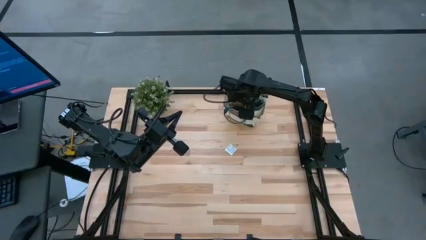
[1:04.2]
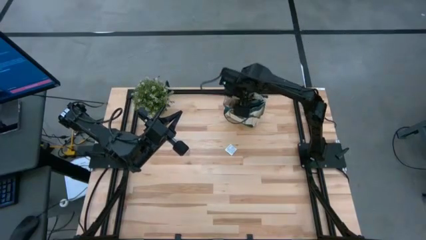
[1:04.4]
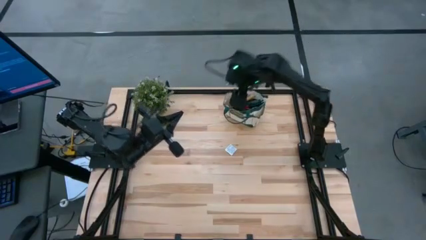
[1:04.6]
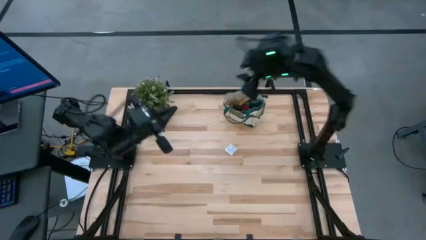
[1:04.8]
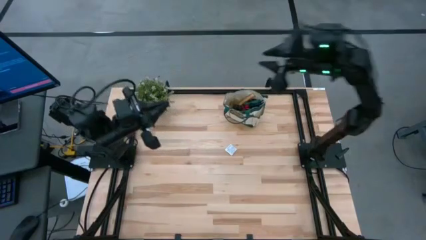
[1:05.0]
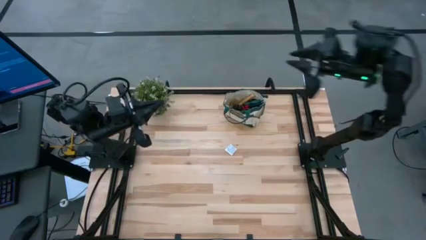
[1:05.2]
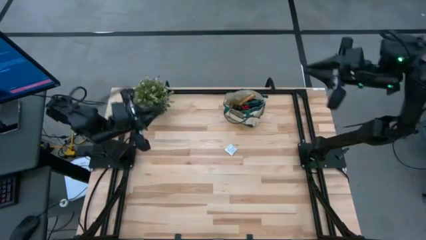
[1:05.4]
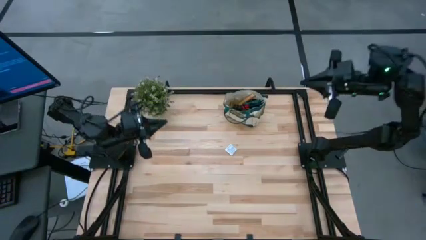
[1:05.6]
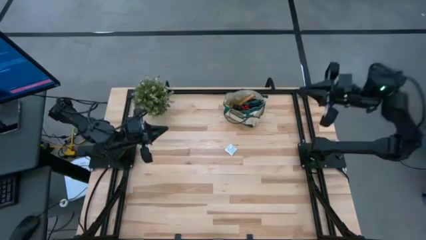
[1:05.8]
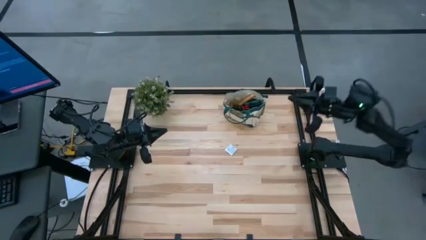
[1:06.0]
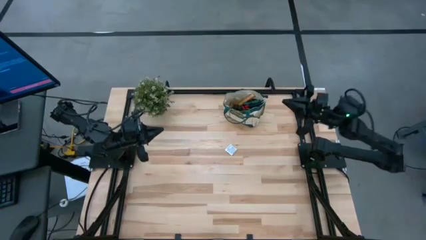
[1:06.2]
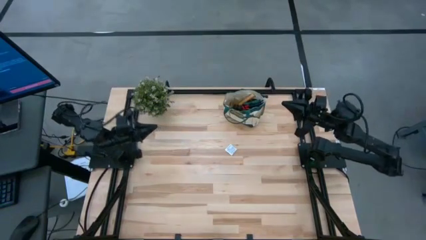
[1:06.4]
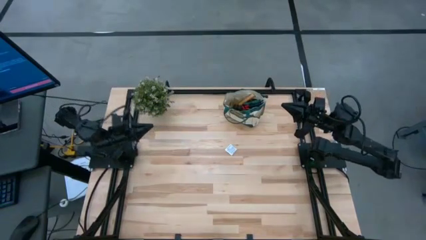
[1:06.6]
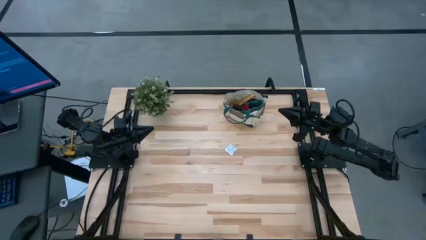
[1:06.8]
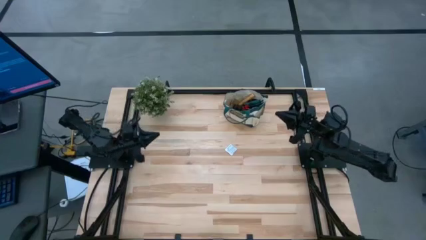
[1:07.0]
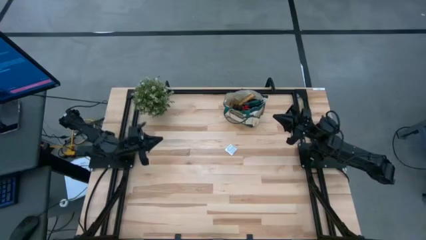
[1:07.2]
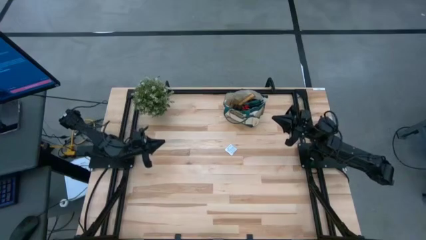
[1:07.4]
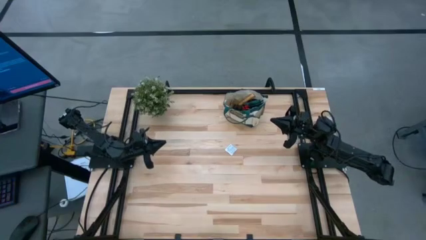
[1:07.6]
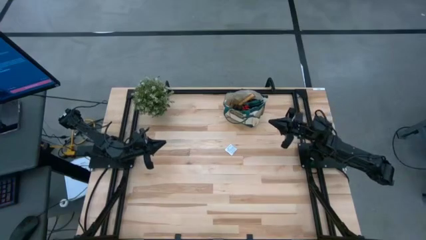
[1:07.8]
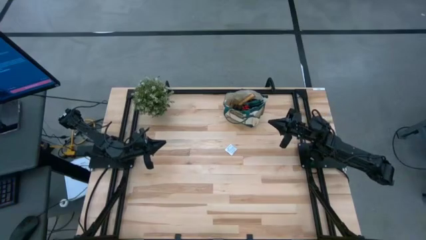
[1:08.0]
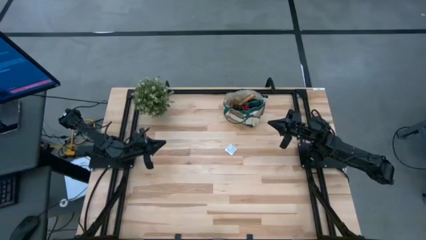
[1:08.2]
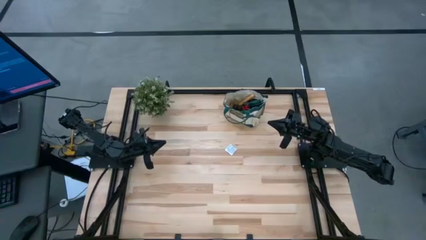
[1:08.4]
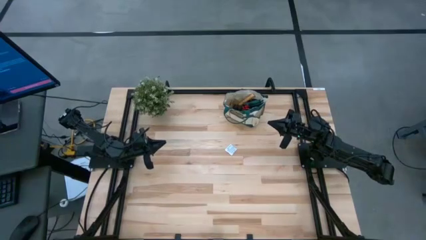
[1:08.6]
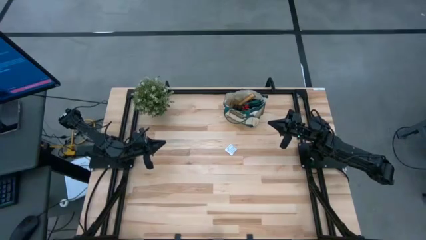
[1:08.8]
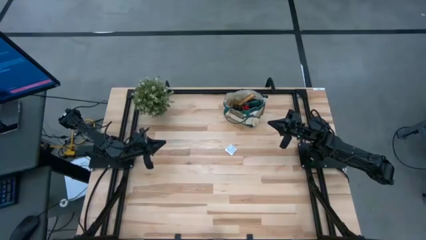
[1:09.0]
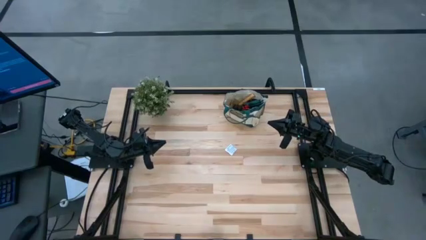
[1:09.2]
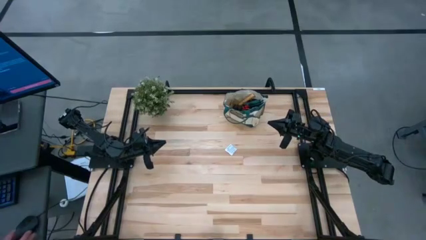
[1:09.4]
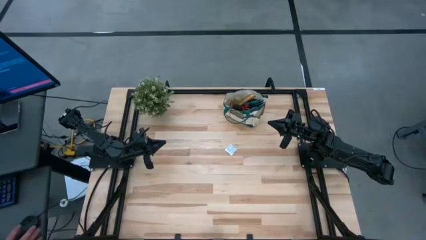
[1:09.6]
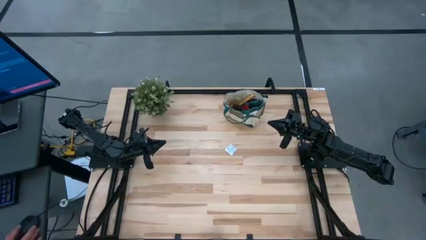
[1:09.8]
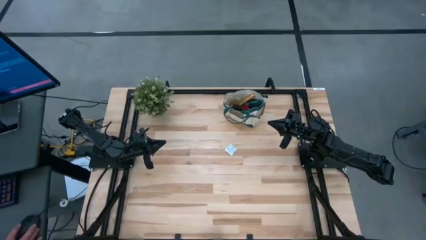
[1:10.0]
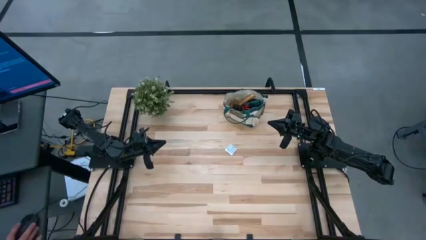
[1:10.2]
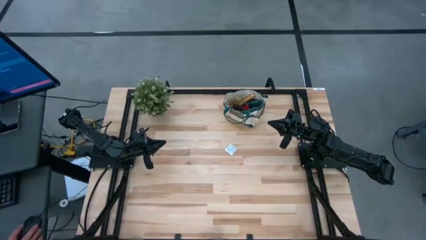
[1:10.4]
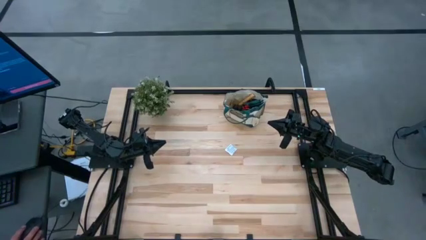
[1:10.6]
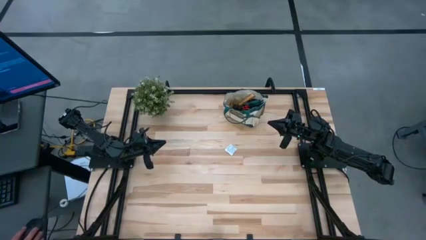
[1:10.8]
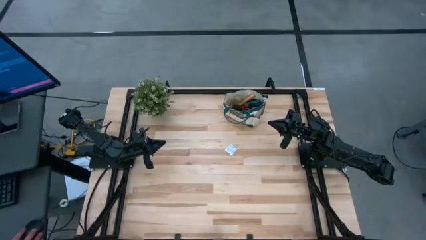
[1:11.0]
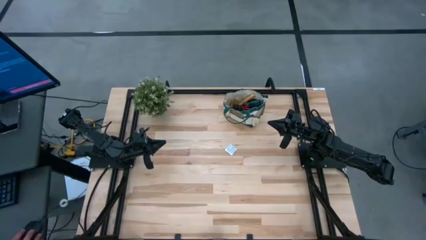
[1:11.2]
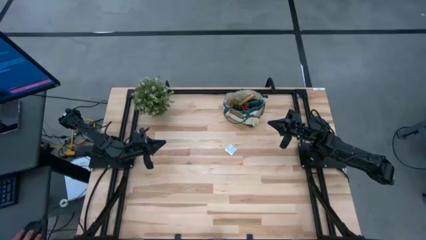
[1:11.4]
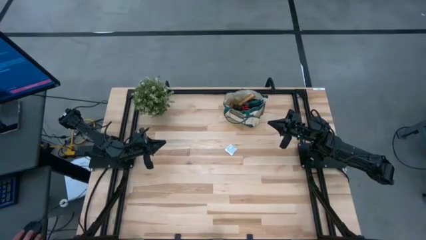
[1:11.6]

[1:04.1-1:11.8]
Task: Pick & Place Garden tools in Gardening bag
Return to Home Position

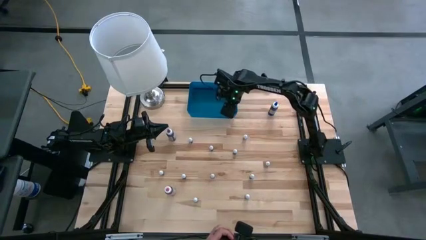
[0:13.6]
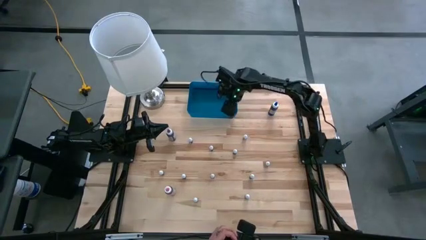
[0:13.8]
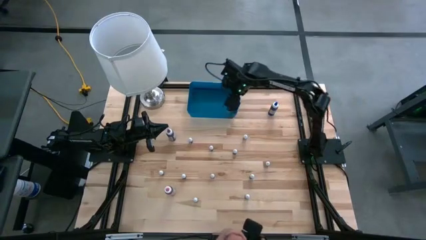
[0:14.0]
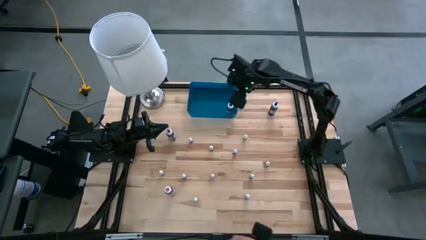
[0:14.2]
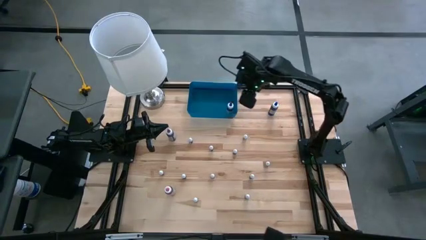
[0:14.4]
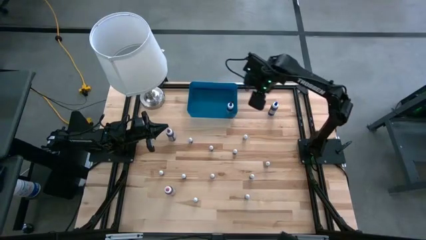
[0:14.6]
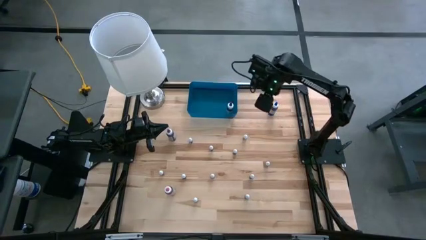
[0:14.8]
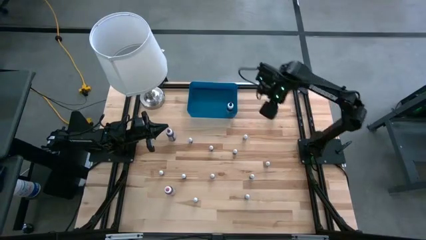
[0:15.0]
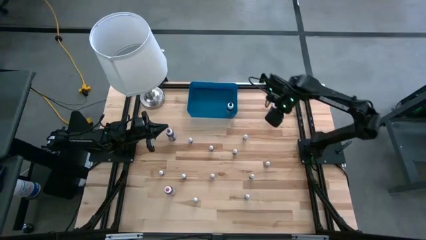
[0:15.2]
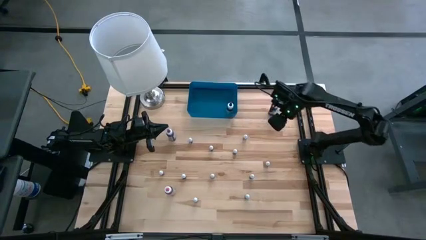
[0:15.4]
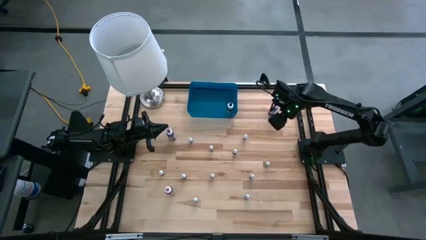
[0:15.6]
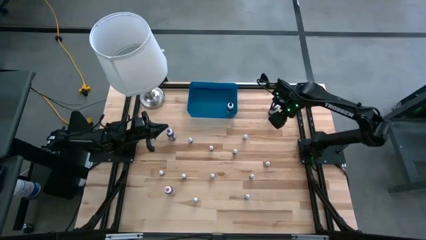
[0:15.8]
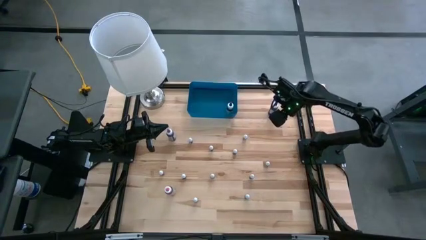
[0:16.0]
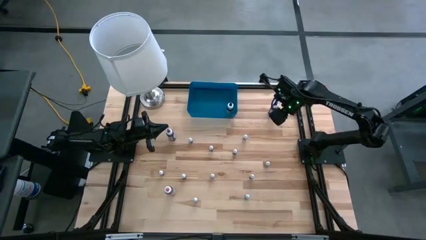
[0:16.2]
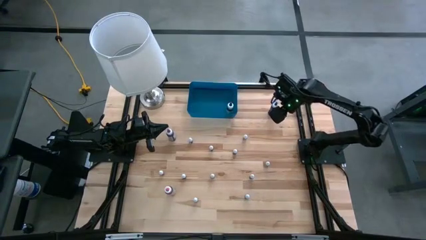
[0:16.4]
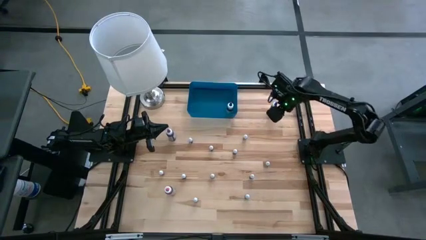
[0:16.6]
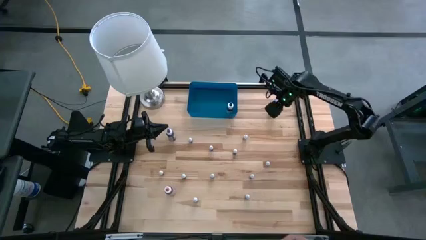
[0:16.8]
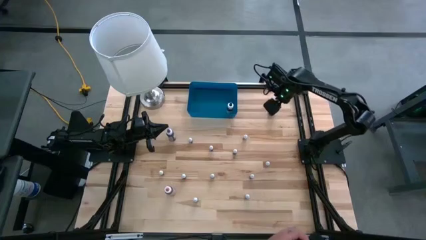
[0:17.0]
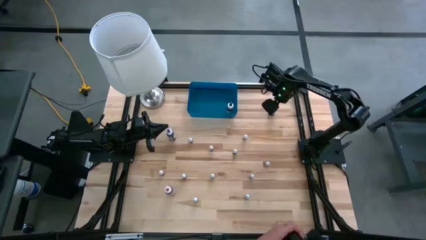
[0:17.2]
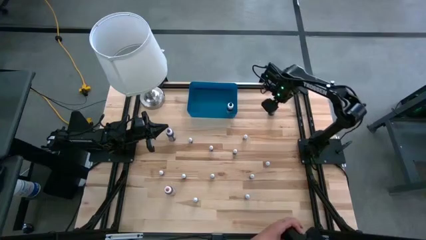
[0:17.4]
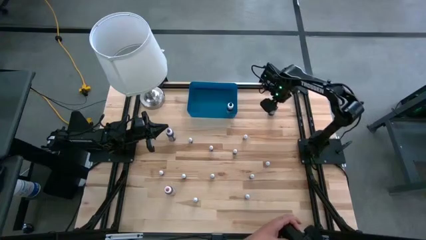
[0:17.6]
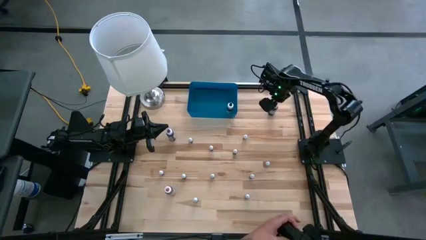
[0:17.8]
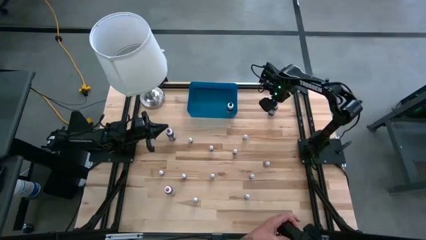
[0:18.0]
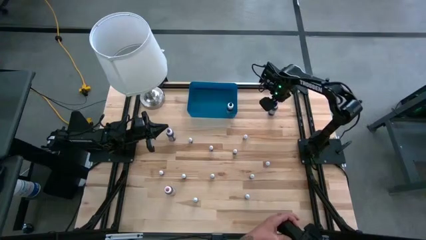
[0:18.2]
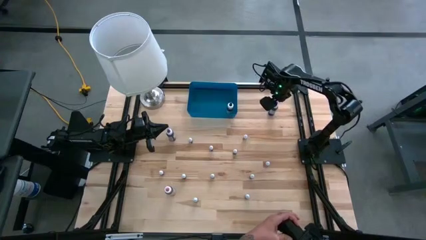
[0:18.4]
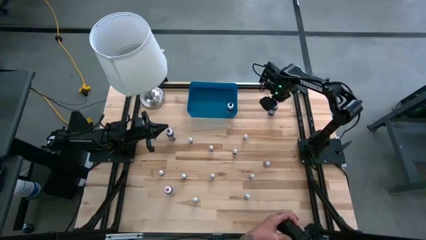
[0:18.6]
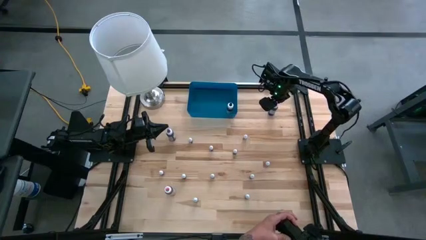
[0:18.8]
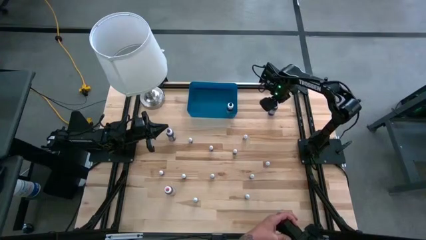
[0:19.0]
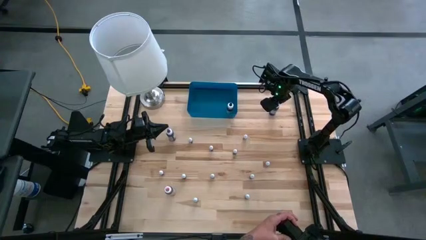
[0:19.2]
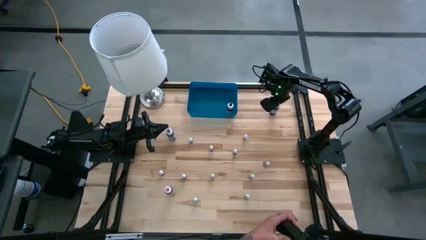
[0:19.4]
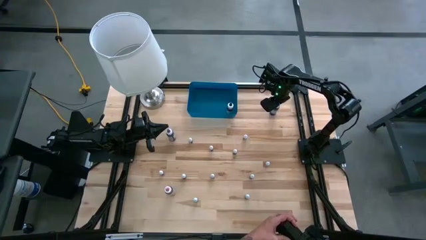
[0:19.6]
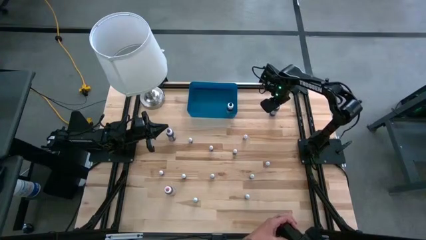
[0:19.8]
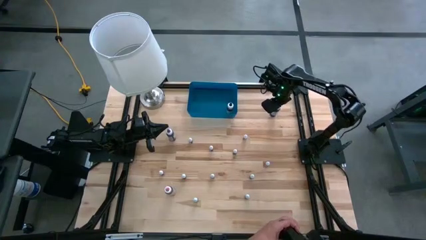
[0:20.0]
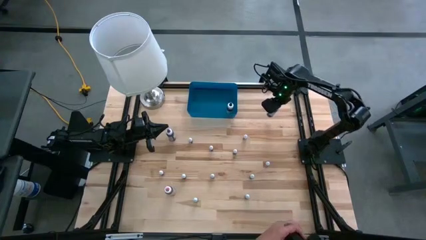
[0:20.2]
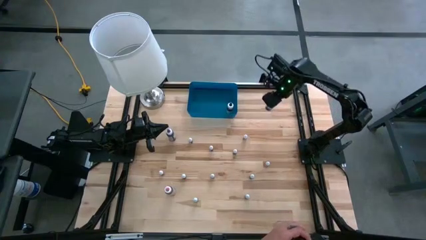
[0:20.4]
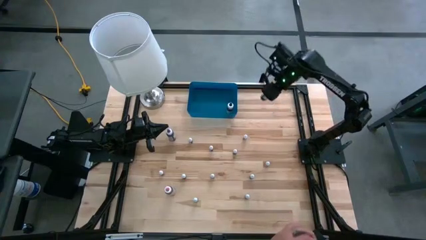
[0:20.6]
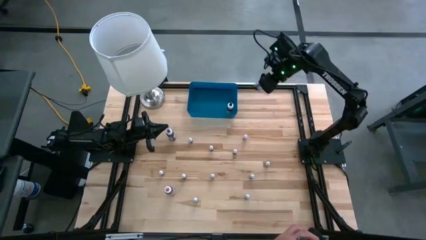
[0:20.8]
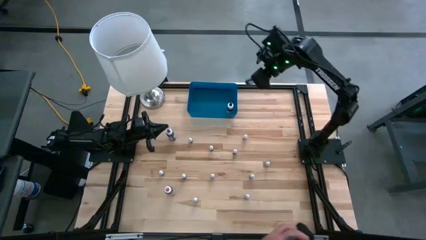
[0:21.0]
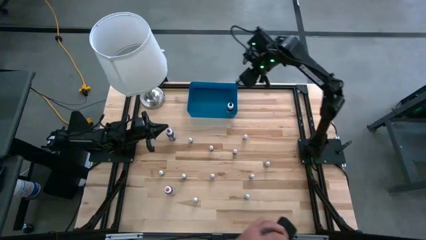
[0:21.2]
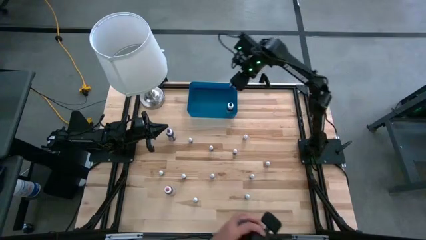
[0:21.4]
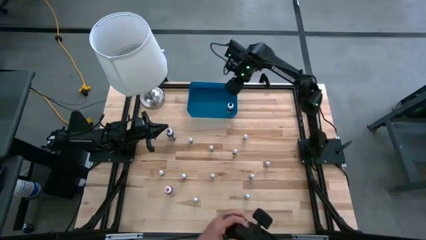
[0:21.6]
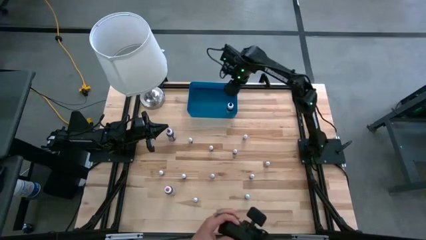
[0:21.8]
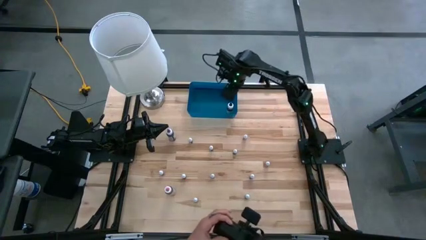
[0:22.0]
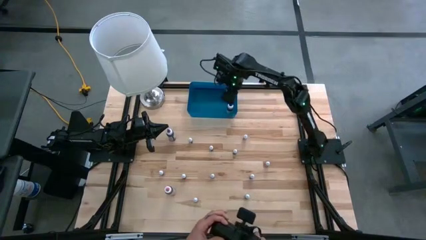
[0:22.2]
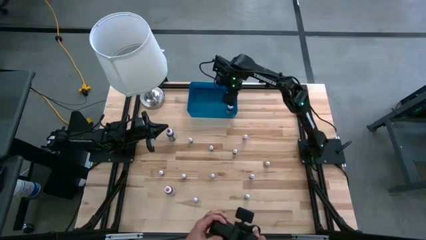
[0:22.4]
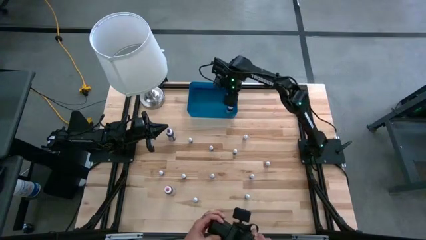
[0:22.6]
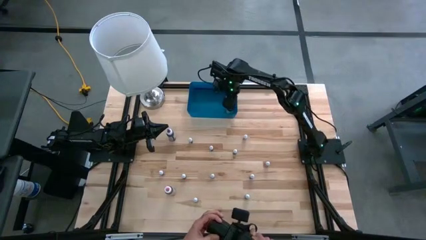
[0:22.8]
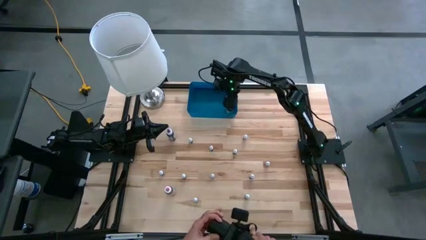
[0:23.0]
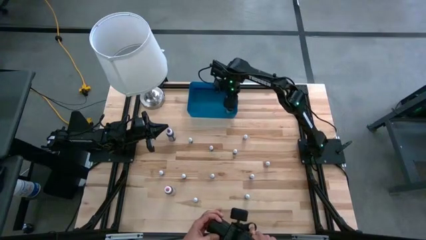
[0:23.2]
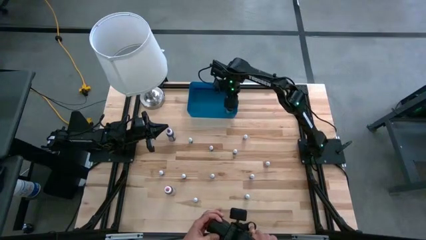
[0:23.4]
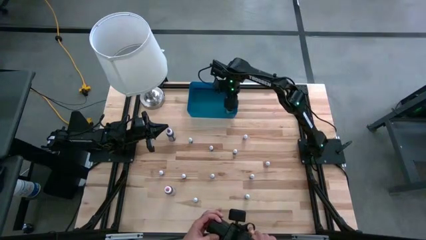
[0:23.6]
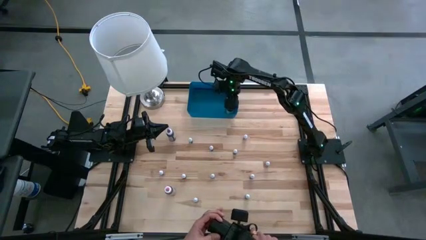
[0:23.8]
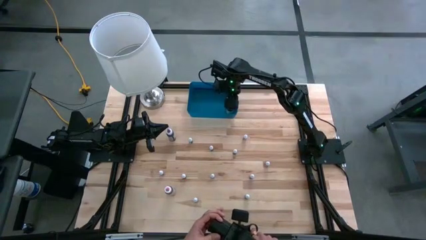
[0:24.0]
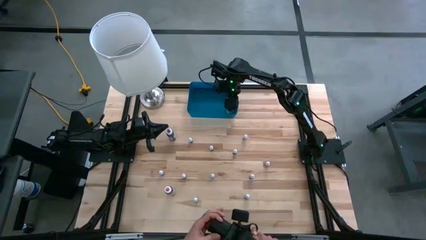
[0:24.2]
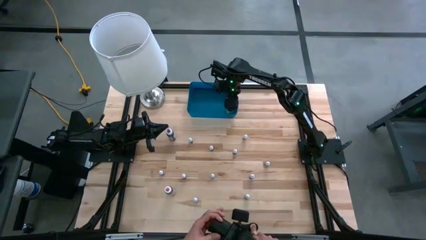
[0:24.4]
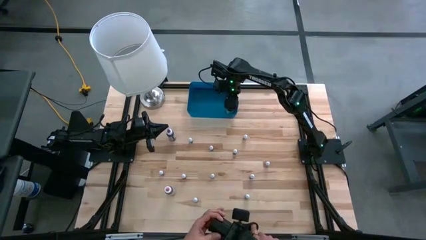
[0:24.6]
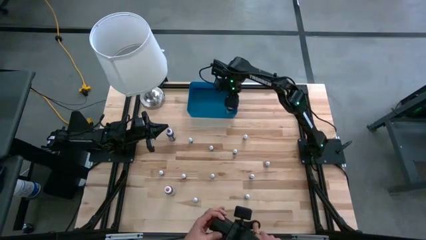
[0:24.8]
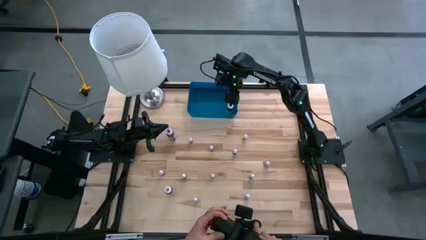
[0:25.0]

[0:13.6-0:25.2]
Task: Pick & Place food coloring
Put the large blue food coloring bottle into the blue bin
